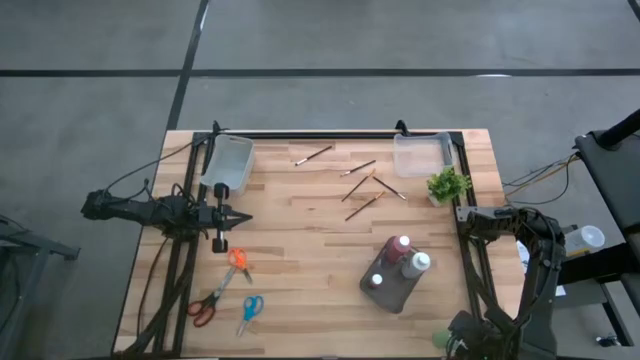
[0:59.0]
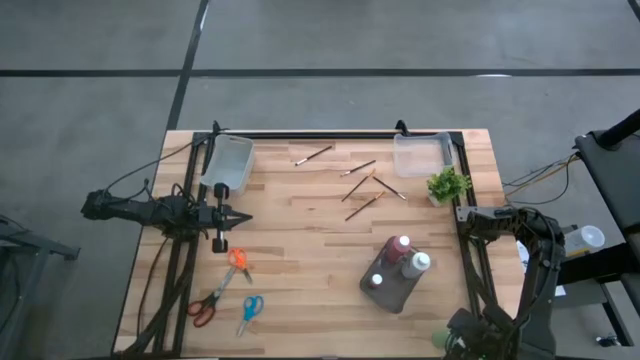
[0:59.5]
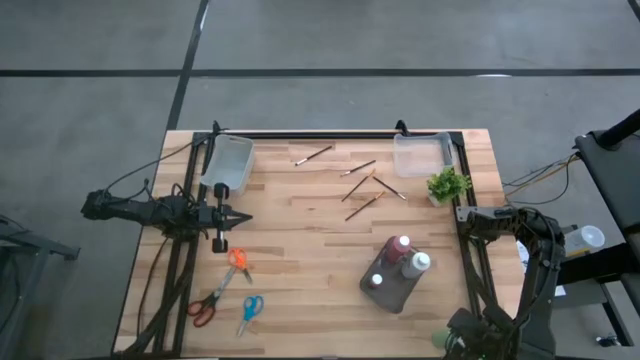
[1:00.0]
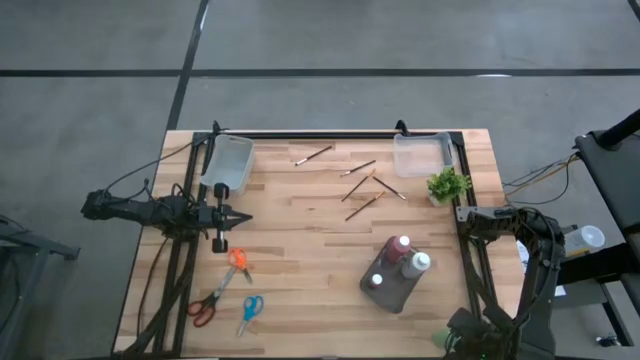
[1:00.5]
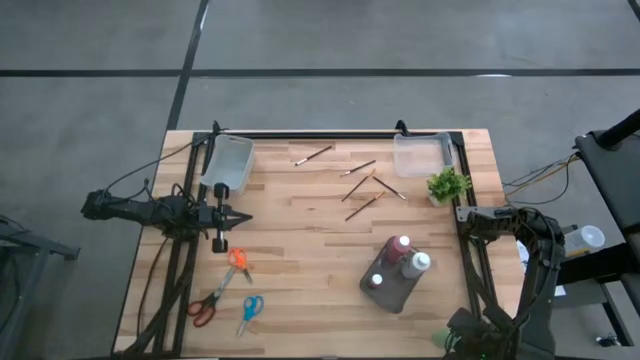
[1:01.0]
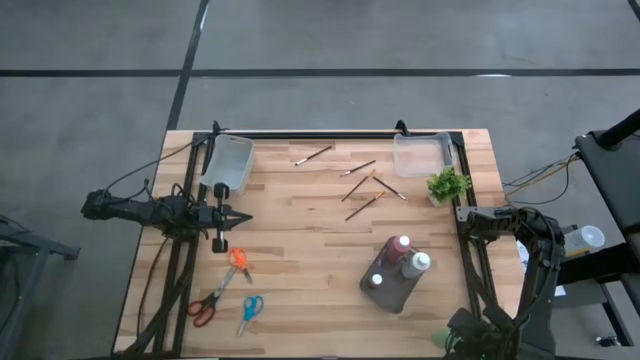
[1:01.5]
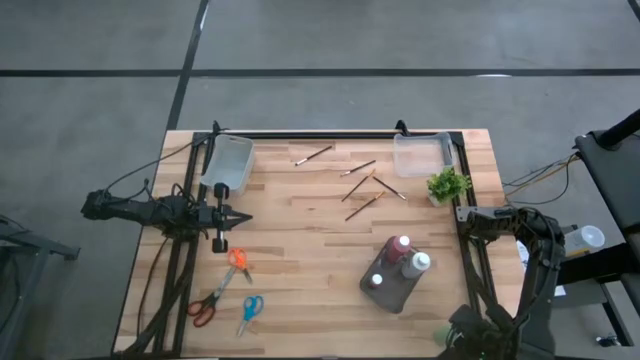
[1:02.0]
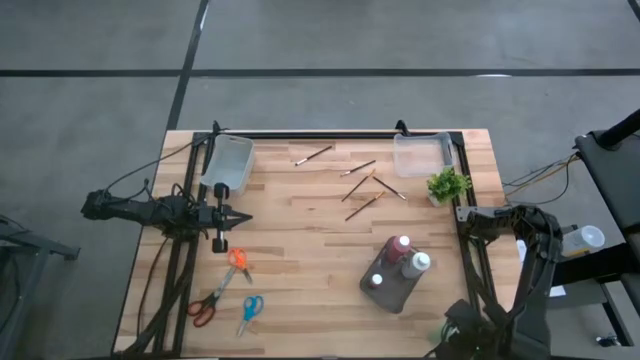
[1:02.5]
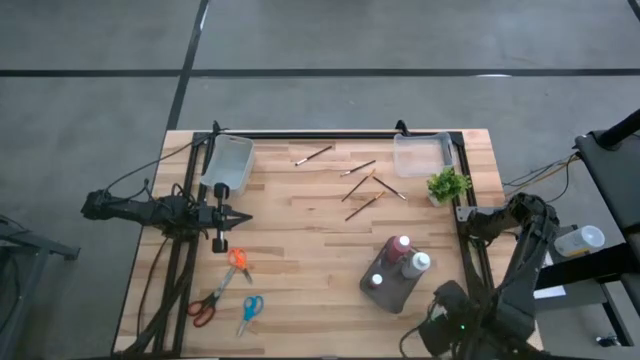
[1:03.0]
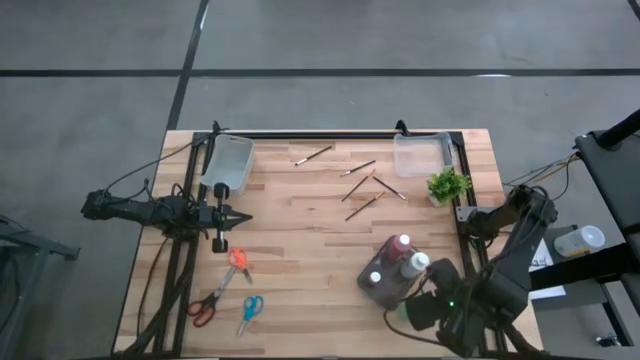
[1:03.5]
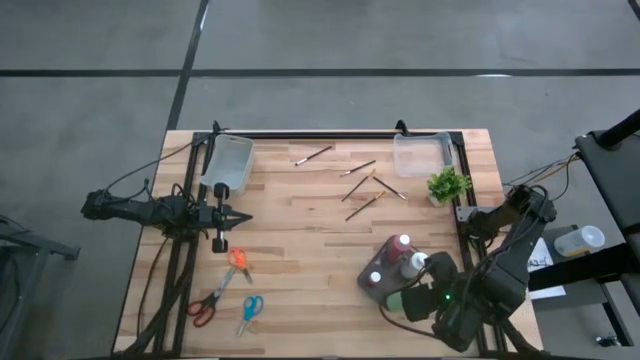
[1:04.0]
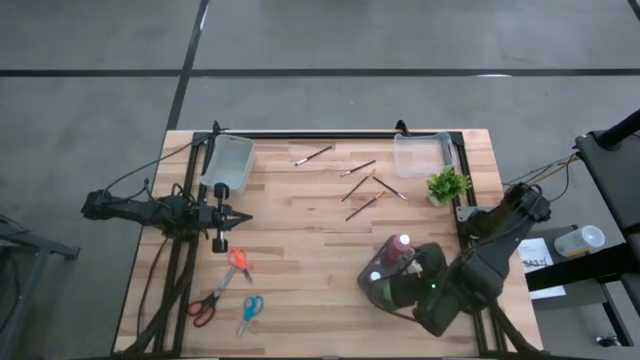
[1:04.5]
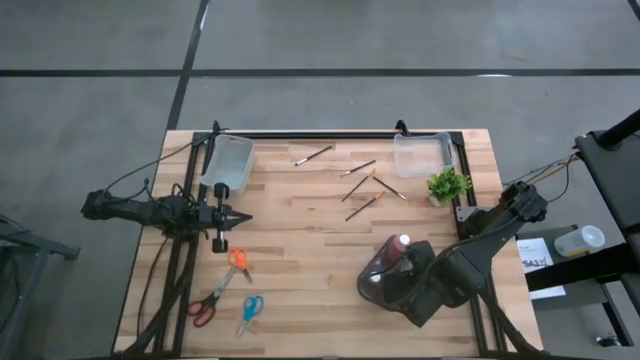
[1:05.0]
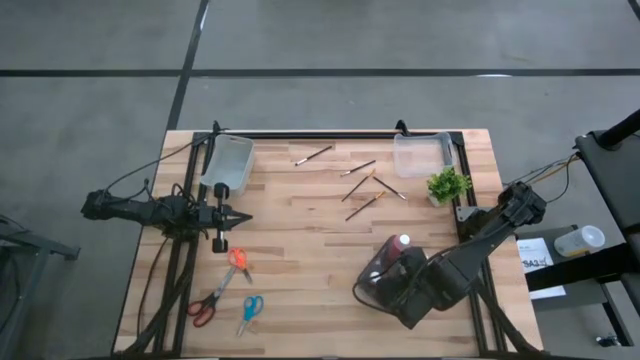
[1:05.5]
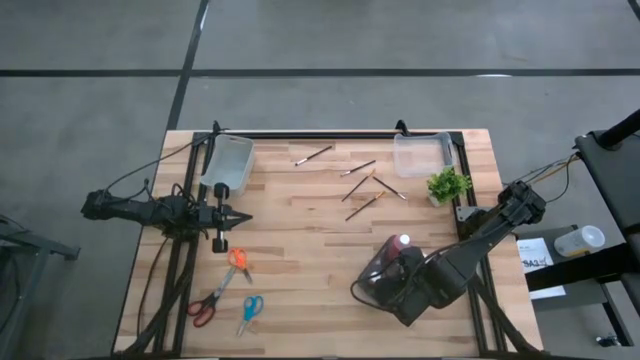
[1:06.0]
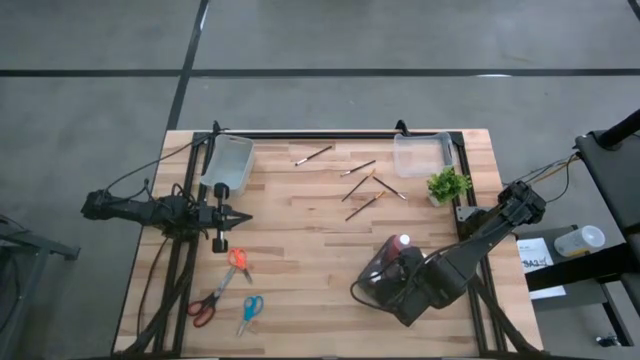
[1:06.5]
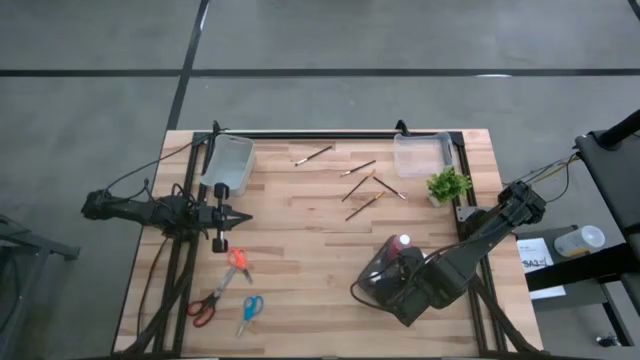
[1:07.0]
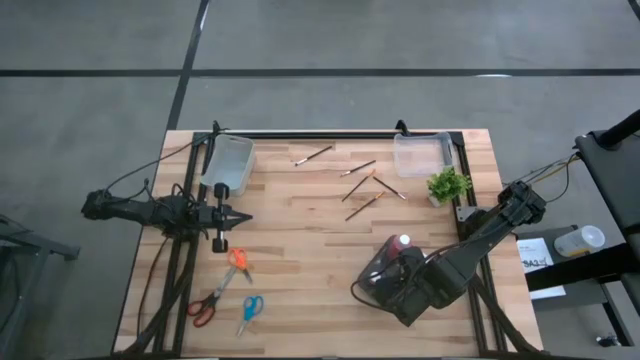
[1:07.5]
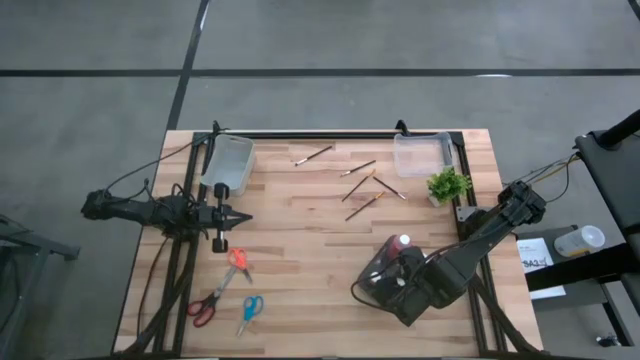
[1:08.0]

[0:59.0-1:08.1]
Task: Pick & Place Paint Supplies
Put the green paint bottle into the black bin

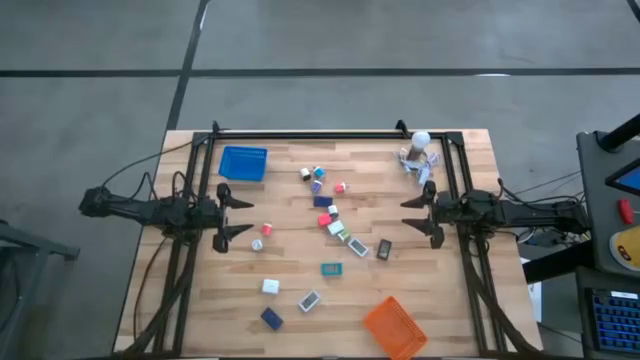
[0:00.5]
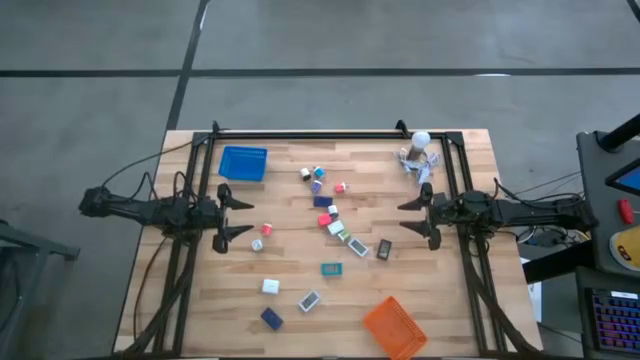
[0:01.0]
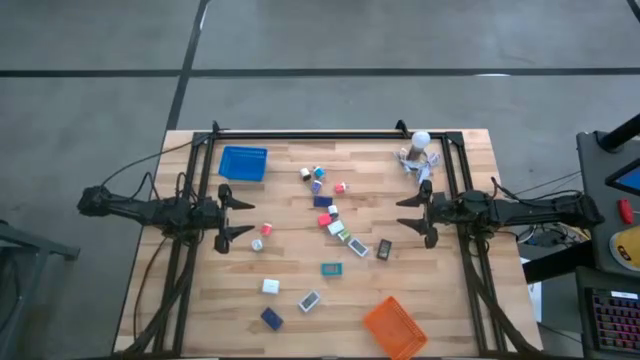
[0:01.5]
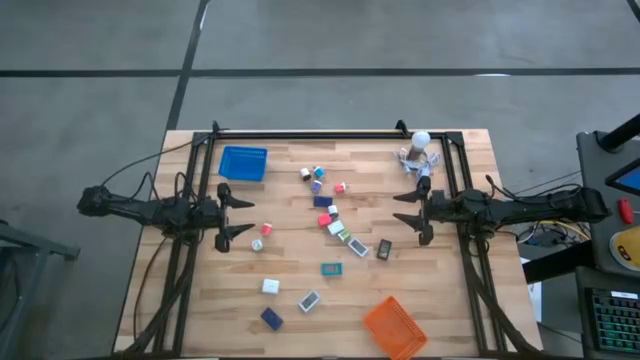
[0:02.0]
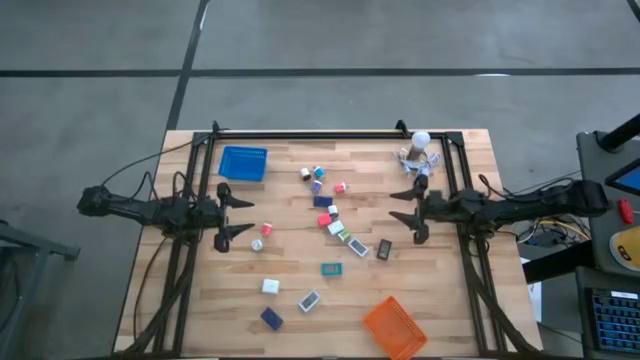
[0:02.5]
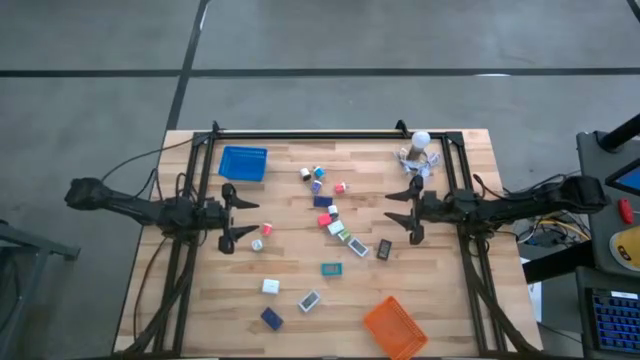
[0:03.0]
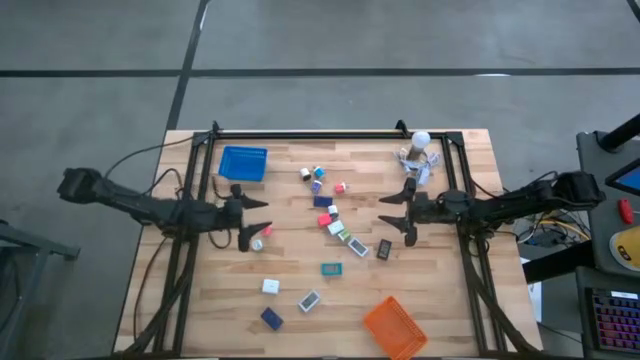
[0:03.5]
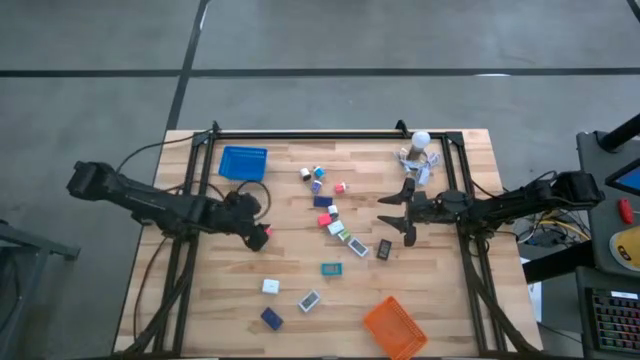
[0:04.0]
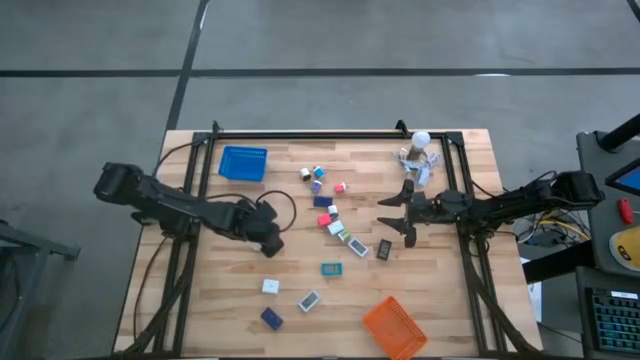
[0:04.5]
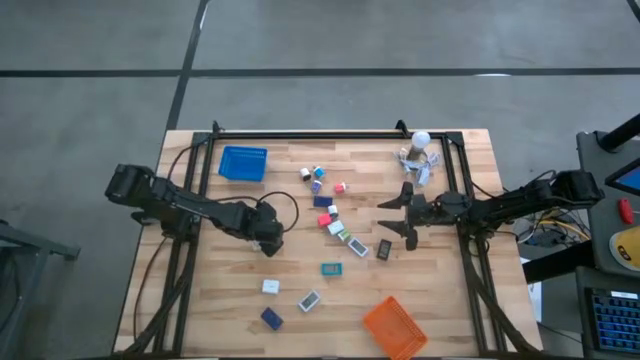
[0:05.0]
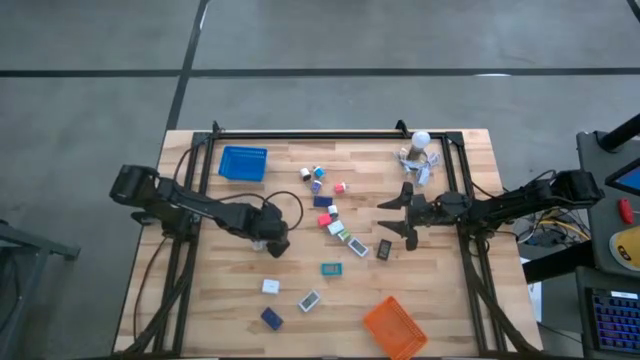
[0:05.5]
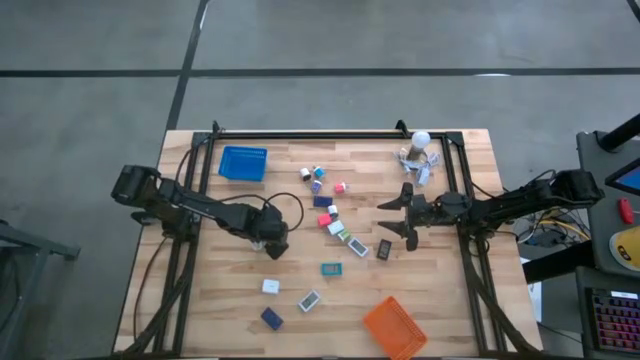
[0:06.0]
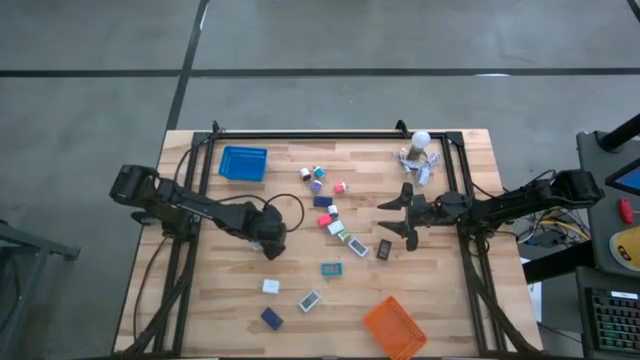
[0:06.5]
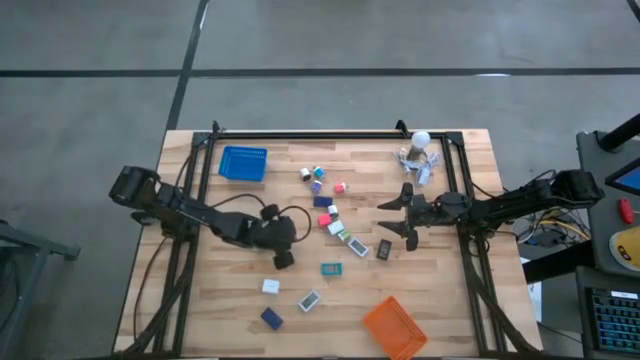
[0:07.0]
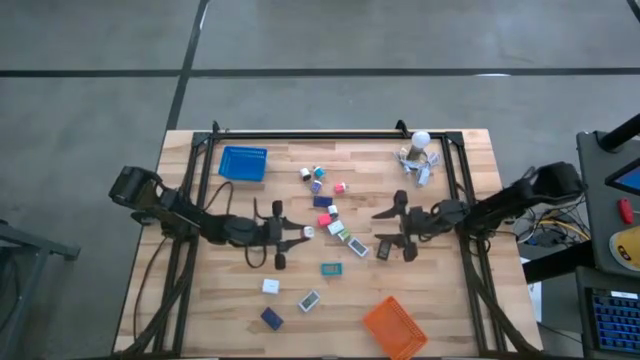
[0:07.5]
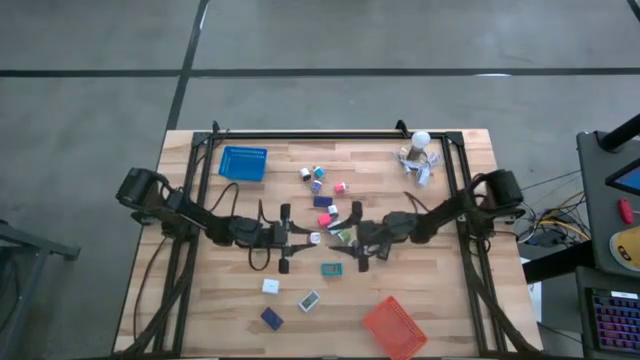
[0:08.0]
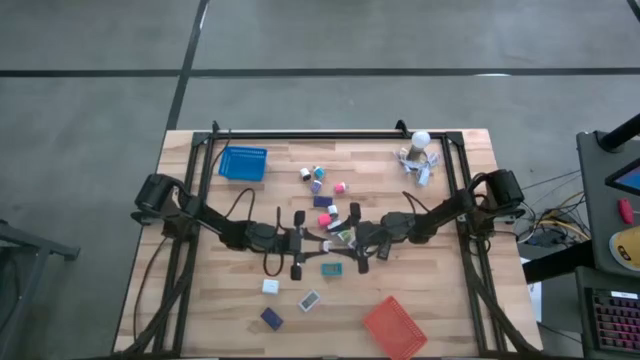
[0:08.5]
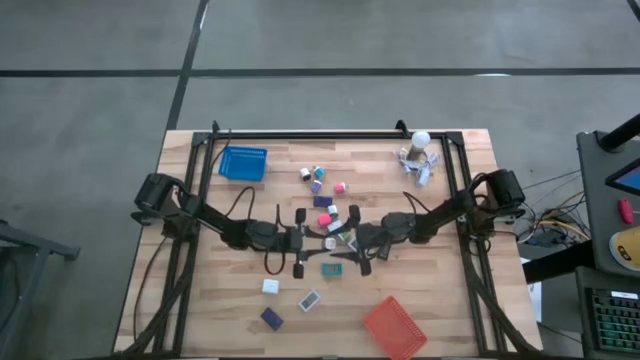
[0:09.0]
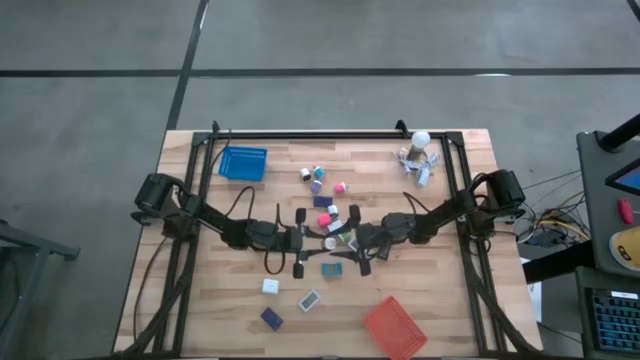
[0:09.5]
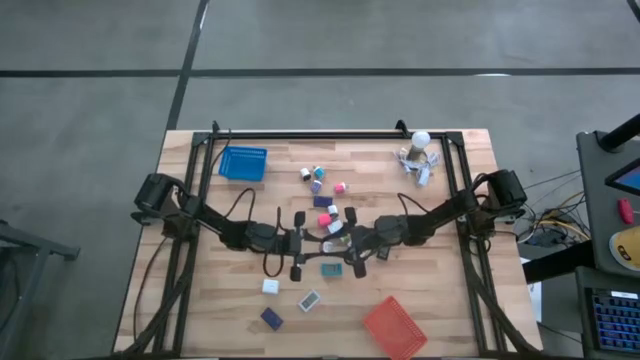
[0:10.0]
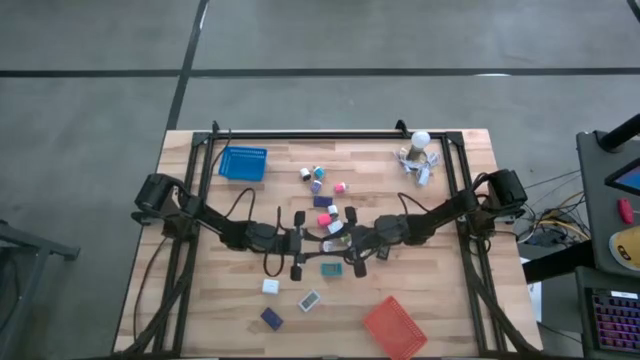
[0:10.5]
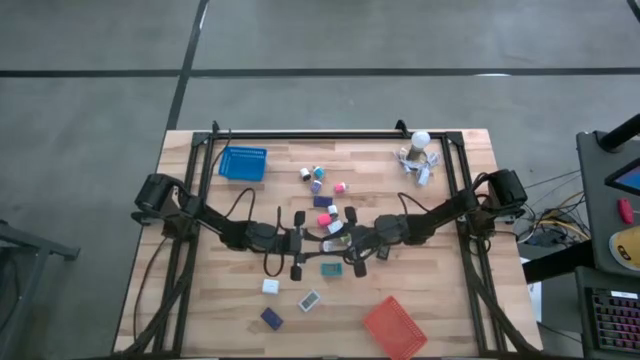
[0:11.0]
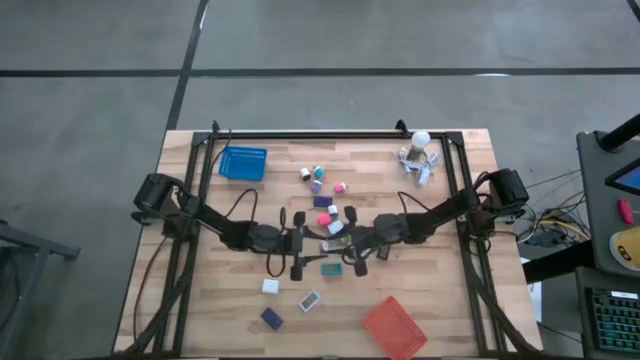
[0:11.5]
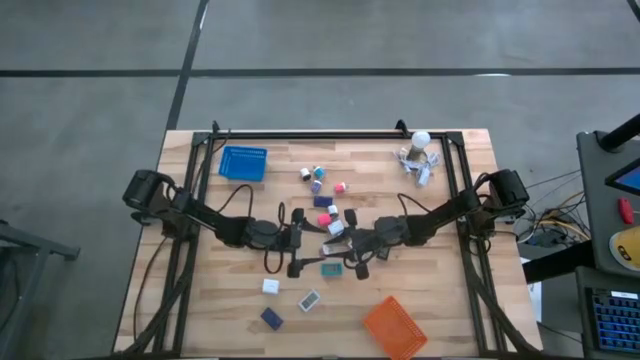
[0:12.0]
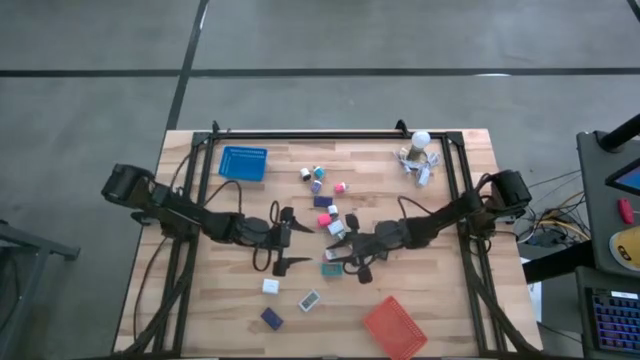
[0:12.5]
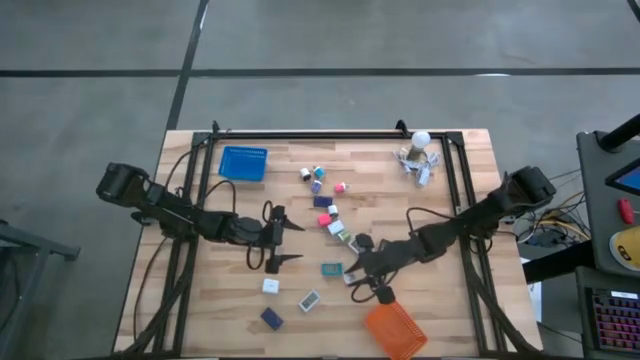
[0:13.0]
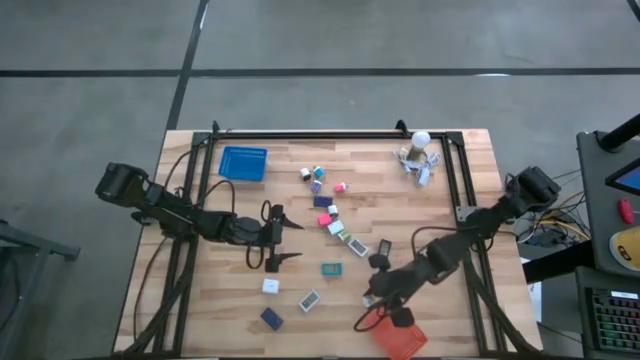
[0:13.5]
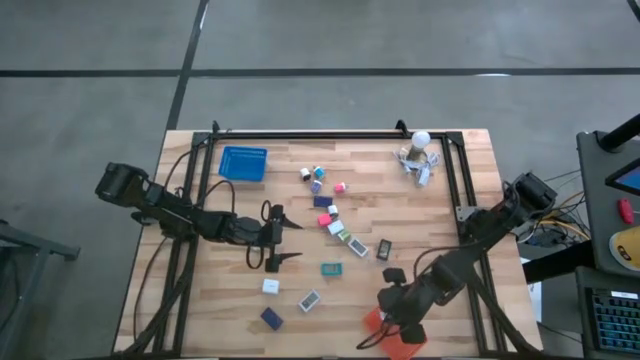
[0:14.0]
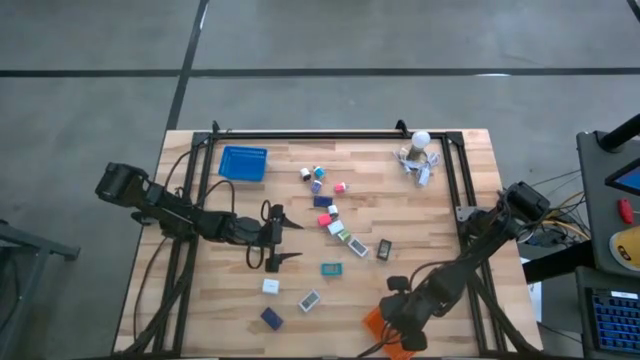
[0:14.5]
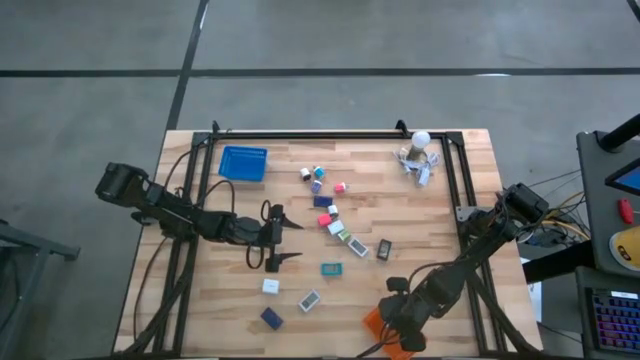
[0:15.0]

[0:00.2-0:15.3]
Task: Pick & Place Office items
Put the bottom pink and white charger adapter into the orange bin
